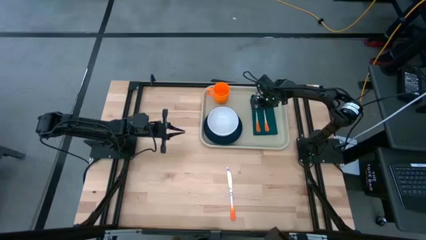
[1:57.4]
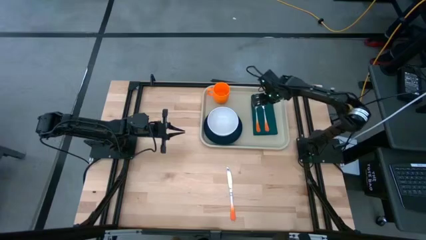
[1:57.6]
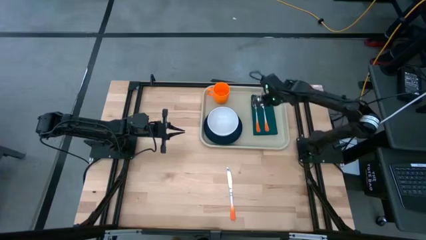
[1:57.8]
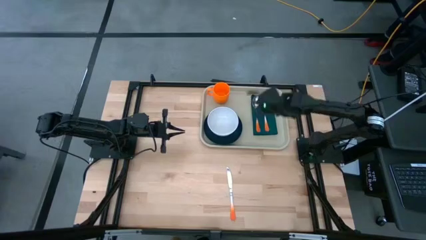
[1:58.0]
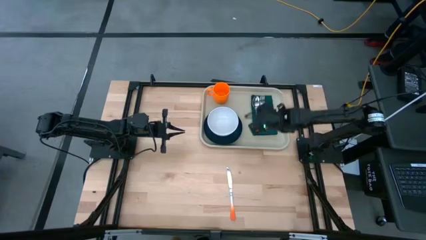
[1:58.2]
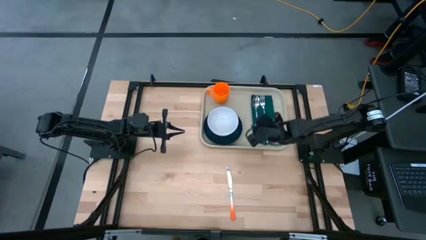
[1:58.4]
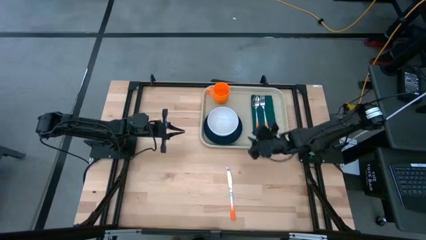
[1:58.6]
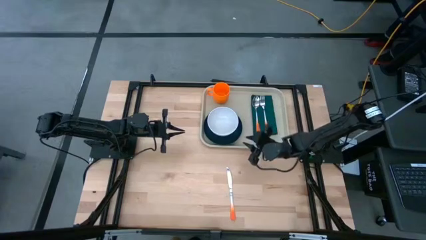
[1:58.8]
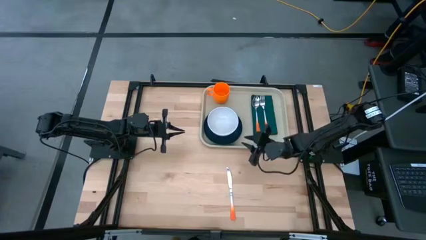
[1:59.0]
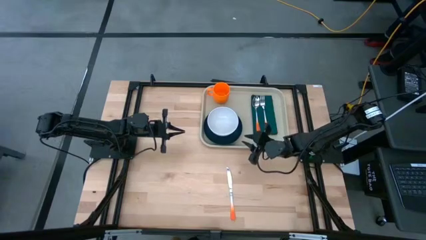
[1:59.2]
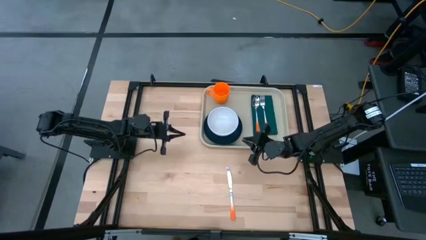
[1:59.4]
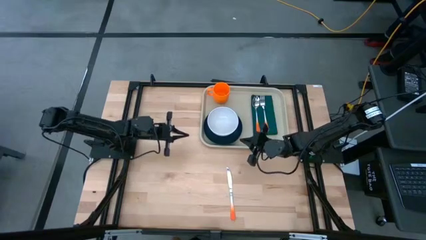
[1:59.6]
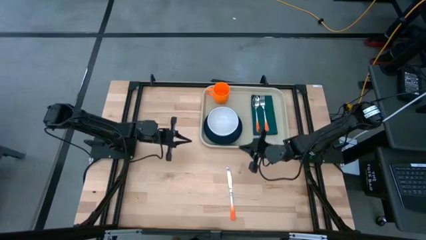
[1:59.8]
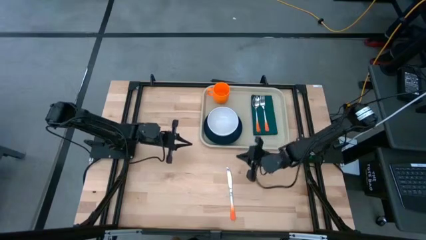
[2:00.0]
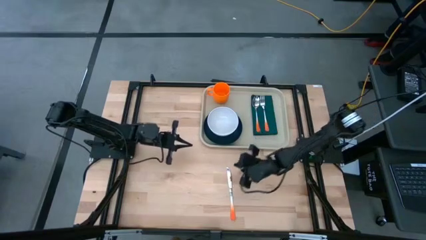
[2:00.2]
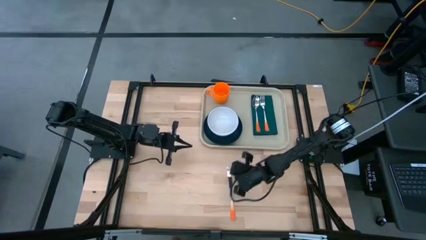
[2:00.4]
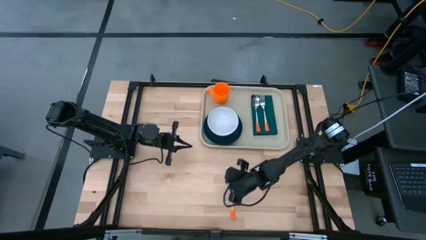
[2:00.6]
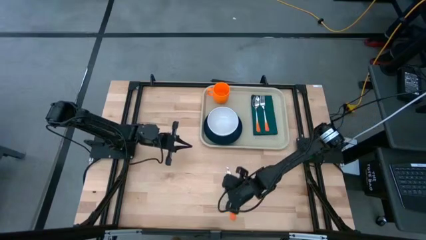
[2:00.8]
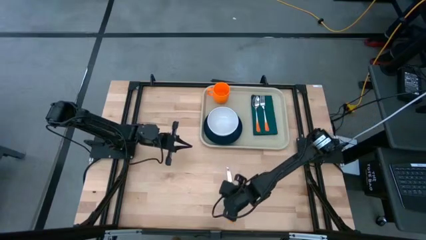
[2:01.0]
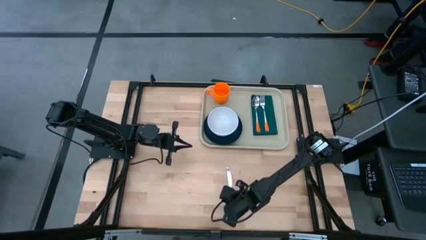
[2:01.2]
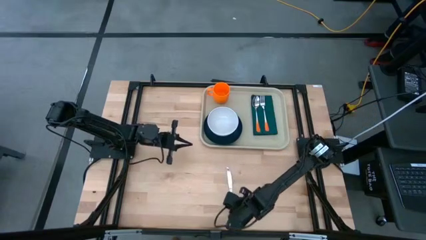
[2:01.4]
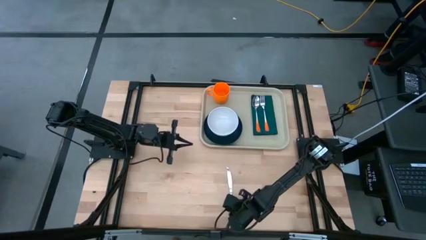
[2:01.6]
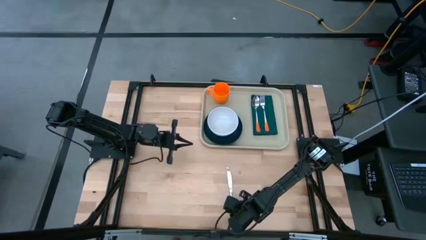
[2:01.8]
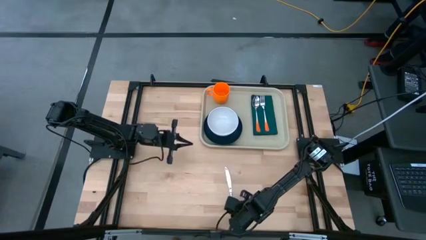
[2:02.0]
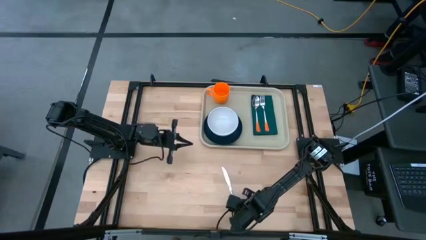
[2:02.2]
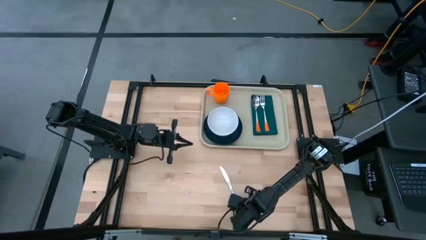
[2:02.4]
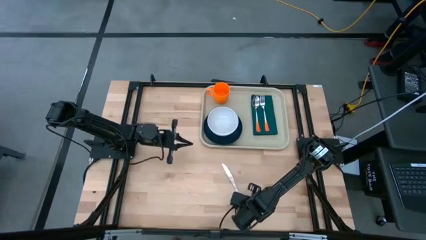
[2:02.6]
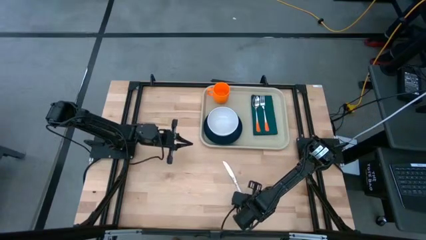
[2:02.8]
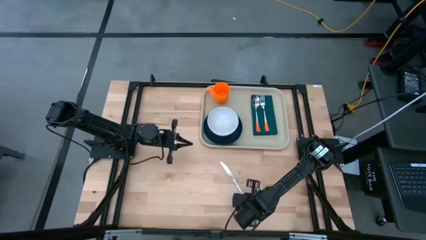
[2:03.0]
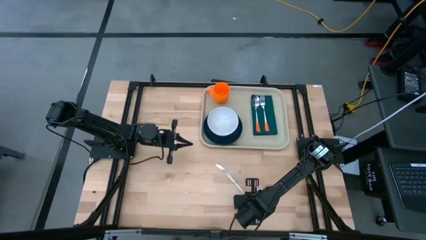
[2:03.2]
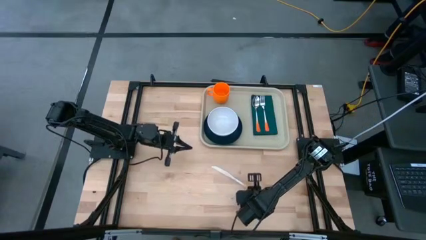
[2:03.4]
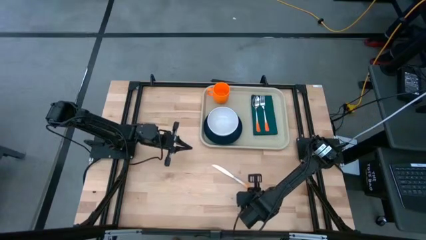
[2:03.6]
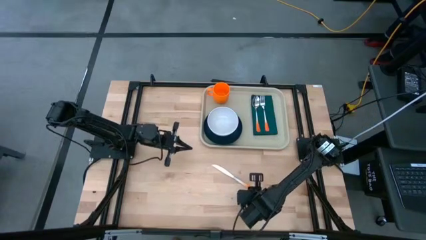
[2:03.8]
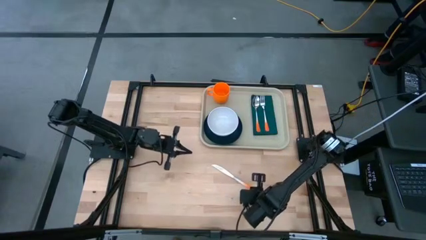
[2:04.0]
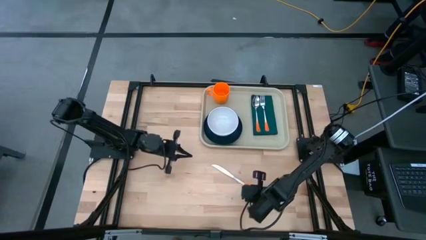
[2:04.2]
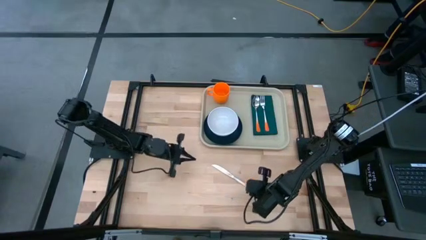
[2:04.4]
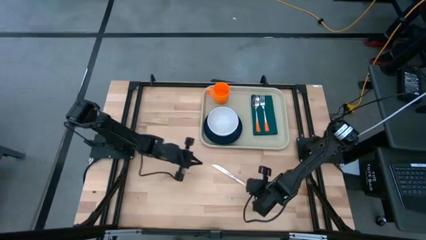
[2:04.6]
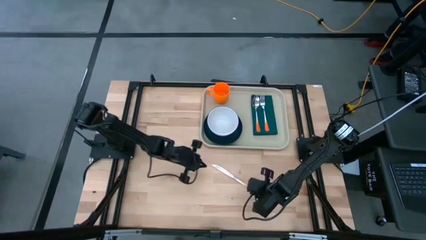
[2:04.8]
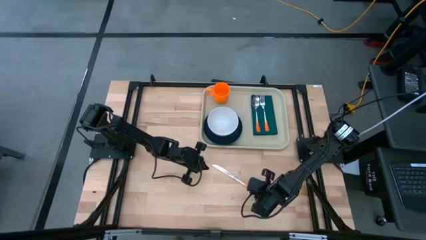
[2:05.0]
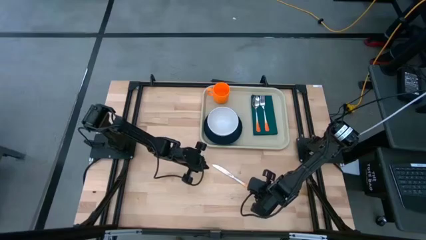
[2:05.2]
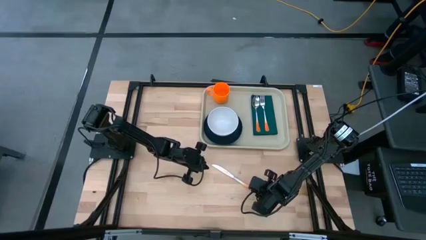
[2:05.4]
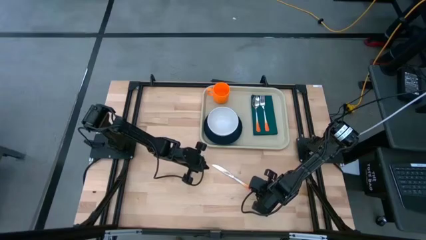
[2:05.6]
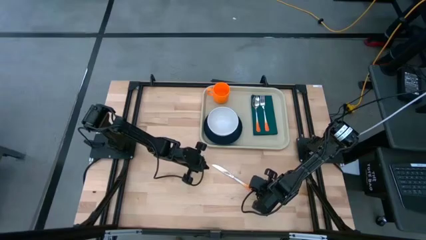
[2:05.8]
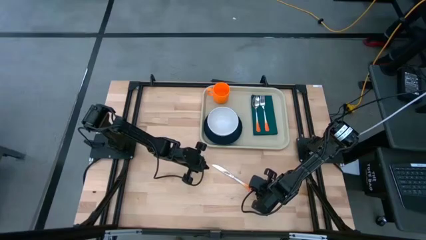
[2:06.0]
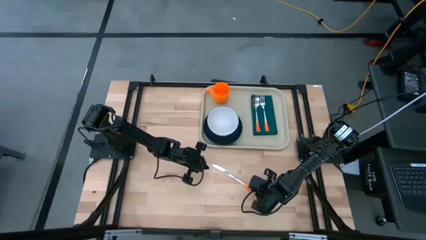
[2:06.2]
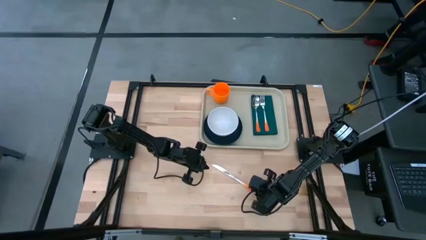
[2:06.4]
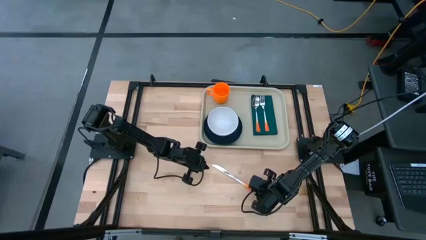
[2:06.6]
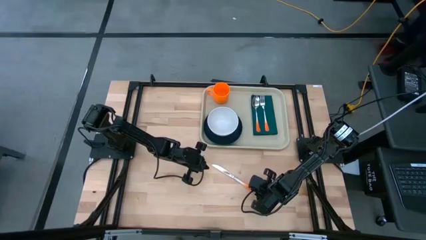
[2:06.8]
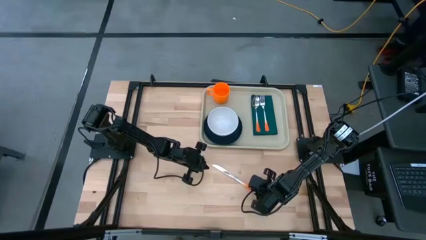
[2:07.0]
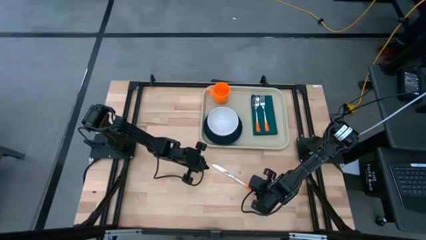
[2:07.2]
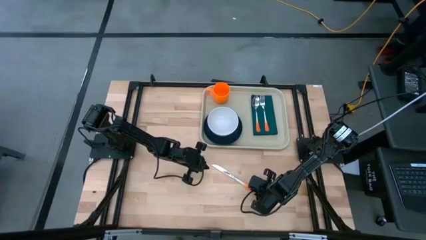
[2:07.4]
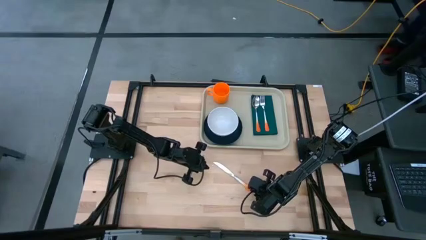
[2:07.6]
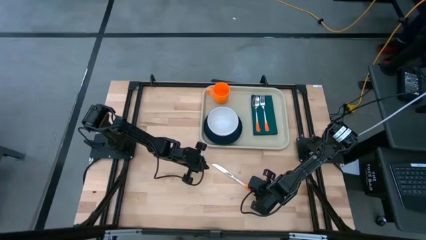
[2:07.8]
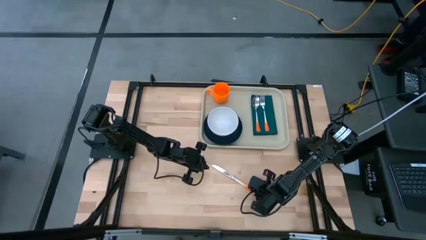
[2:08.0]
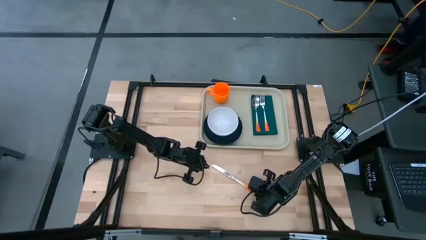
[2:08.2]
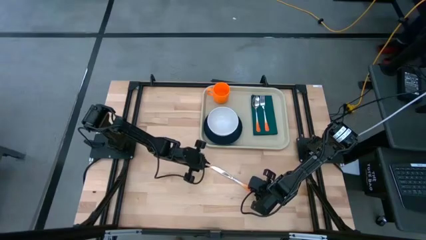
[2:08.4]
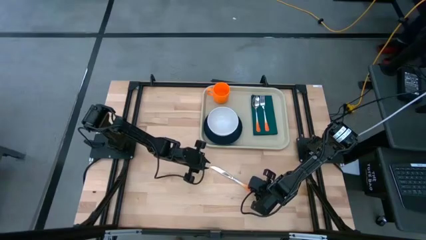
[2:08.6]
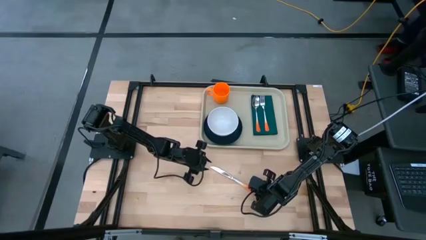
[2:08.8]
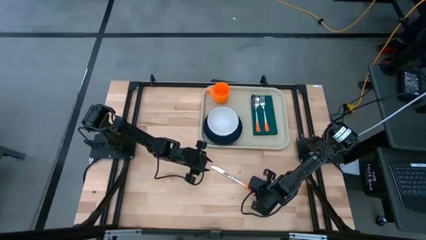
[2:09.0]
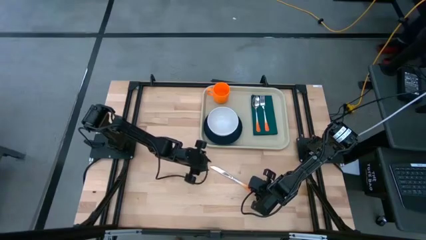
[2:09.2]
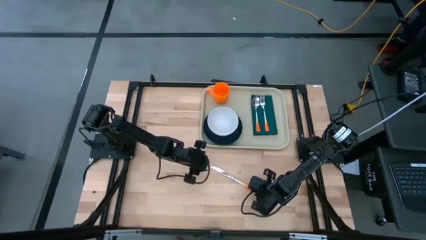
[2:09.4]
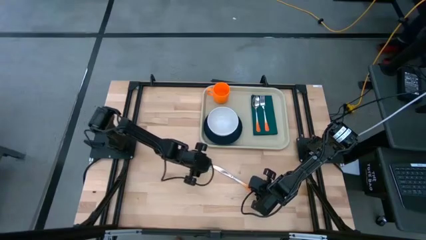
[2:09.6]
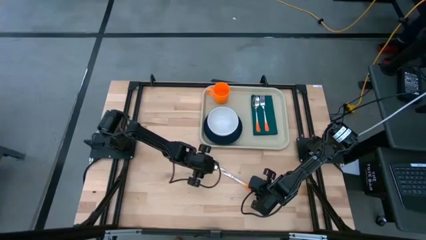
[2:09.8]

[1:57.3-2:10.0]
Task: Set up tray
Put the orange knife to the right of the orange fork on the serving tray

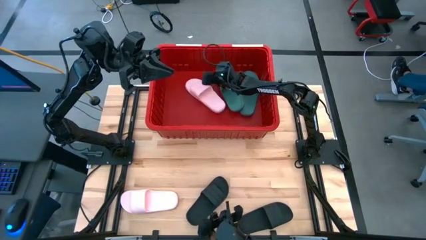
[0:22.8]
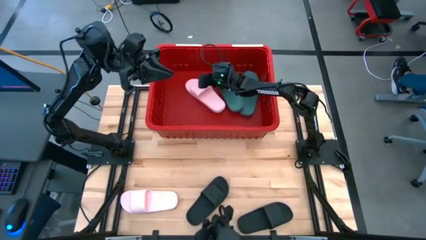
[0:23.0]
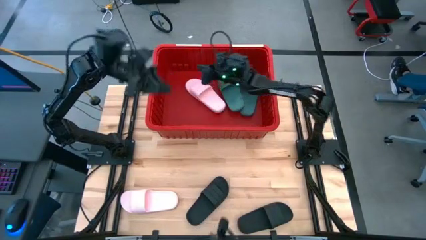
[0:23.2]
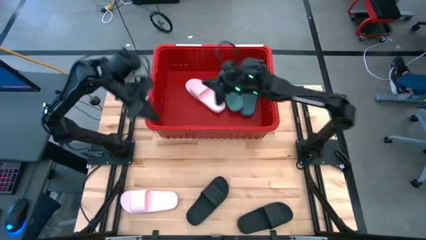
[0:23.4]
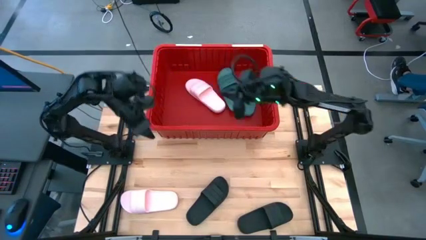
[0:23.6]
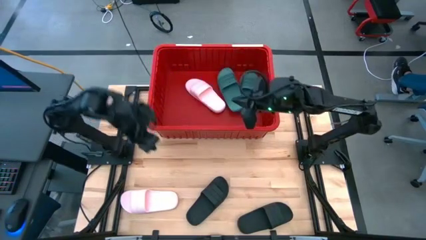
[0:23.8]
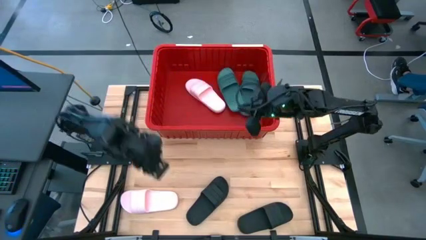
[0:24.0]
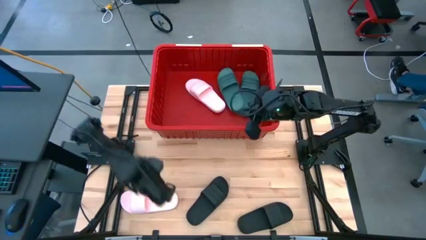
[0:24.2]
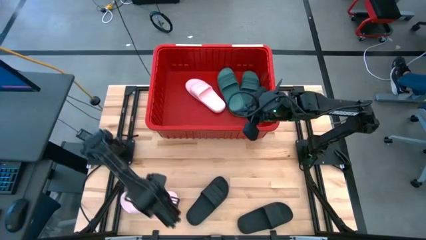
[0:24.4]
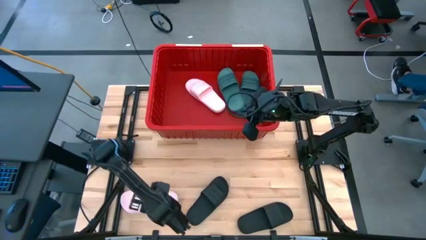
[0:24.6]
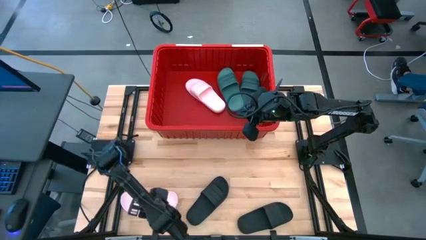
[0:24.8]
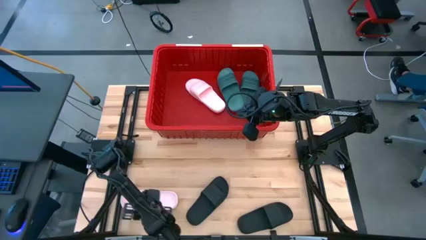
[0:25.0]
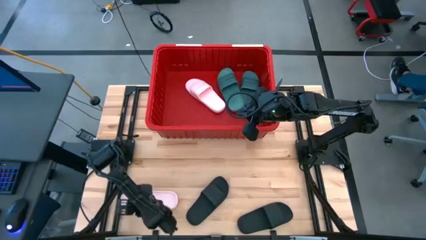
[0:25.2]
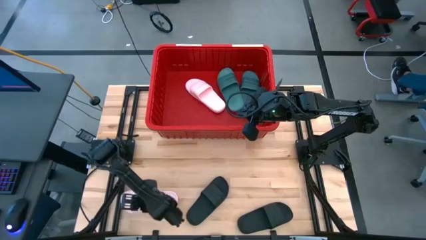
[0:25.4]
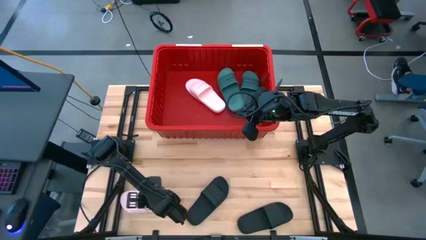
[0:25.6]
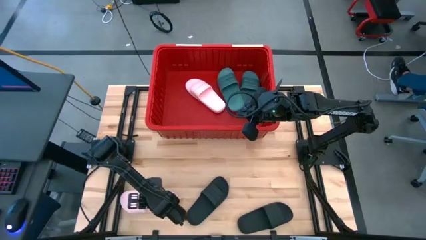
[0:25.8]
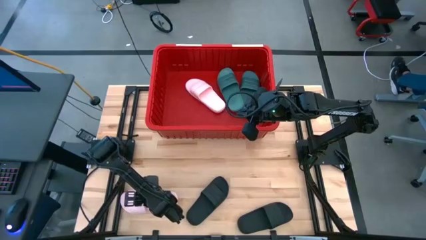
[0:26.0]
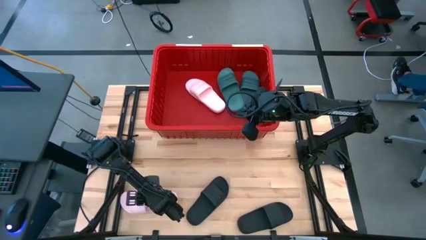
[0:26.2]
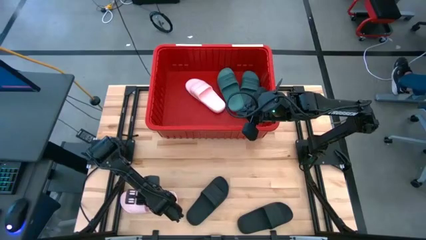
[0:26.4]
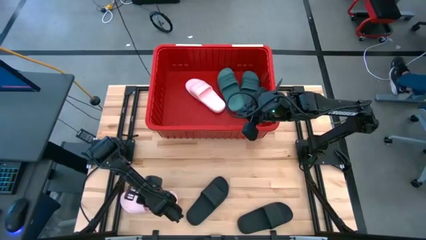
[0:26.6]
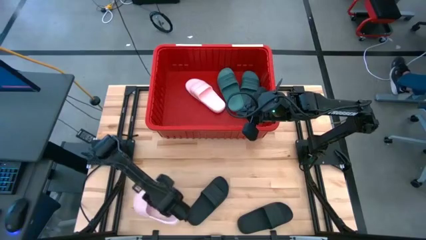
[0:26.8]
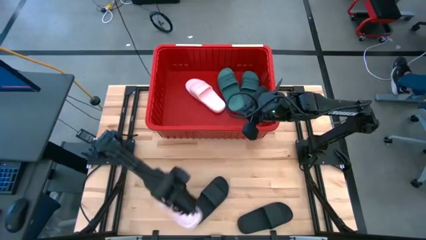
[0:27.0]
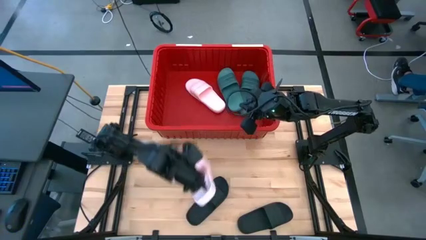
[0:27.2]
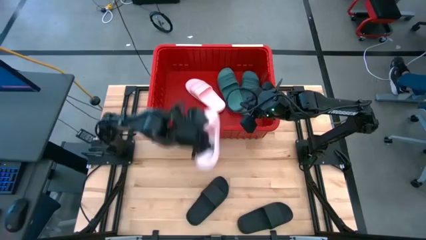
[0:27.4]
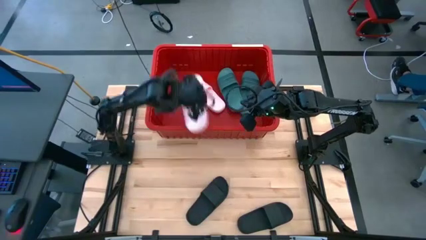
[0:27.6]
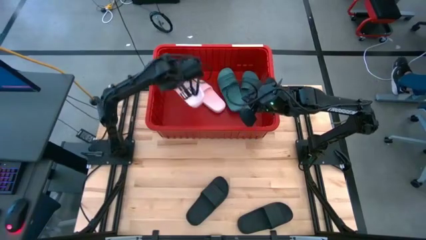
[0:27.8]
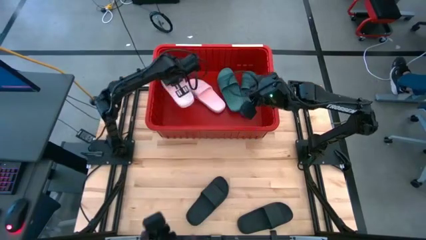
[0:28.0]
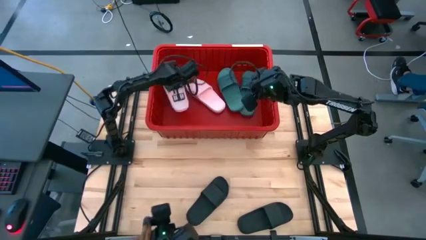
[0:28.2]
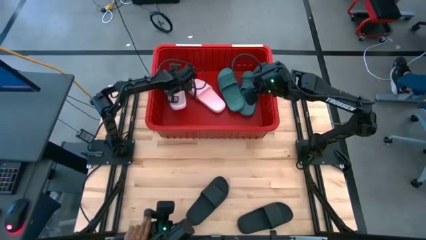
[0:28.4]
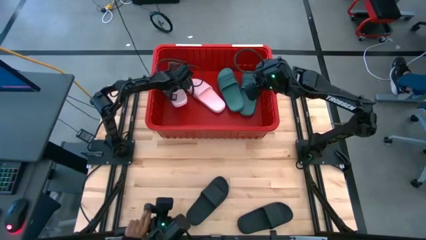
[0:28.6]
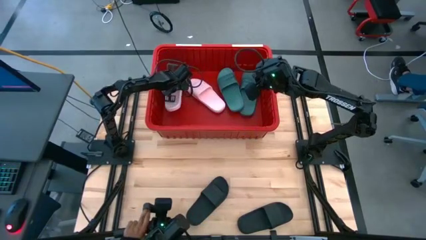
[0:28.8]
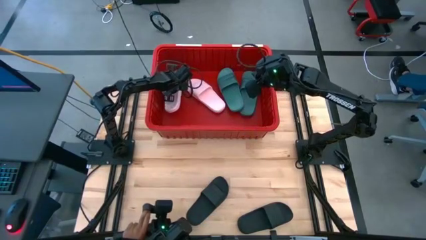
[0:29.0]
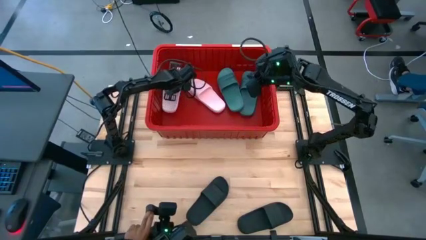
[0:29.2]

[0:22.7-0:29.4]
Task: Pick and place slides into bin
Put the pink slide into the red bin
